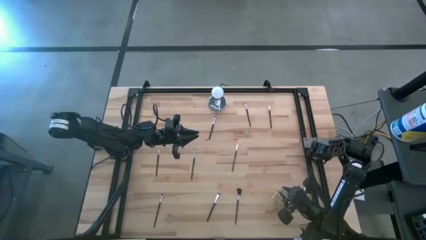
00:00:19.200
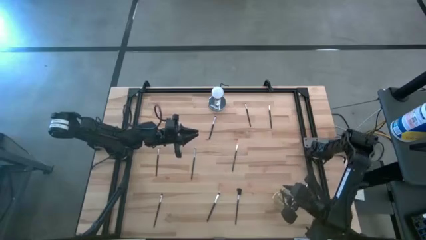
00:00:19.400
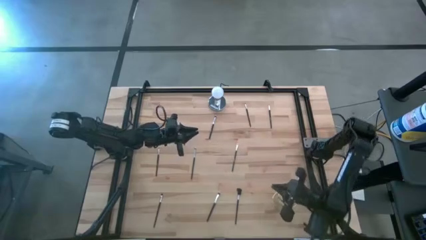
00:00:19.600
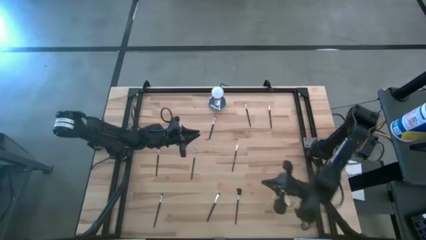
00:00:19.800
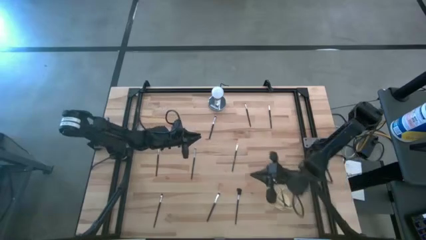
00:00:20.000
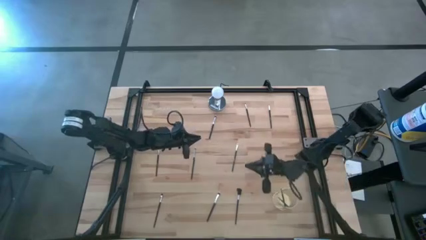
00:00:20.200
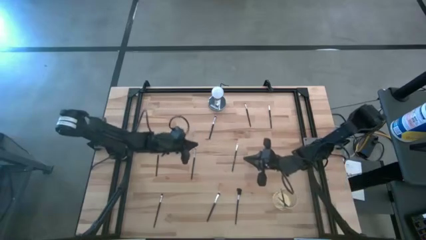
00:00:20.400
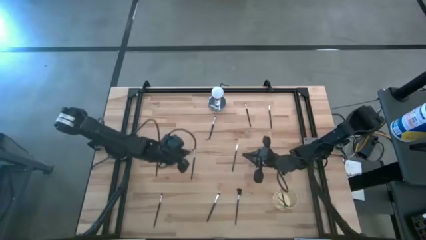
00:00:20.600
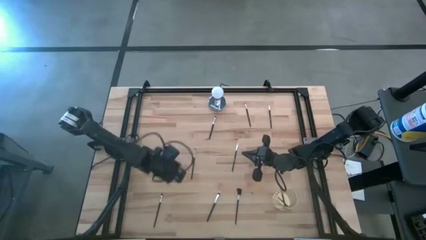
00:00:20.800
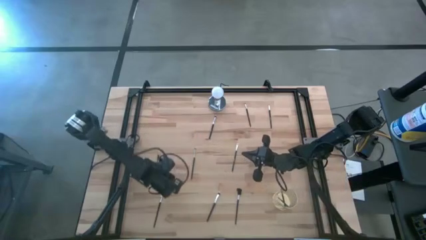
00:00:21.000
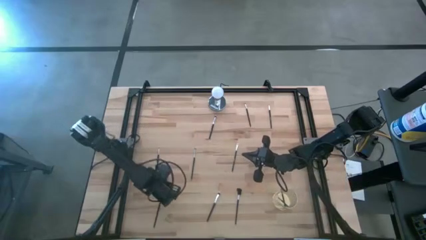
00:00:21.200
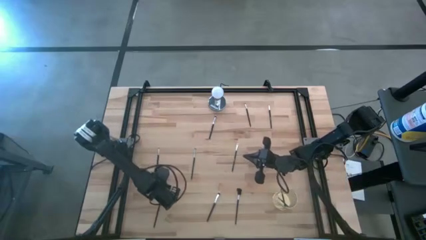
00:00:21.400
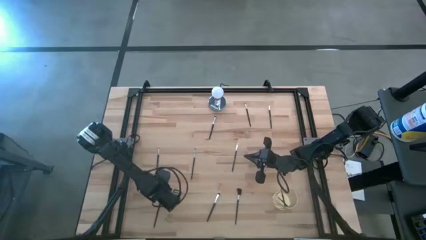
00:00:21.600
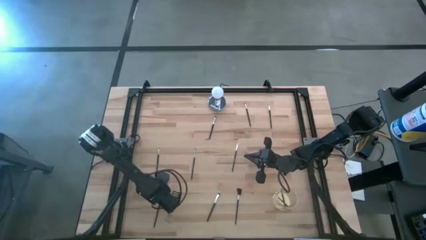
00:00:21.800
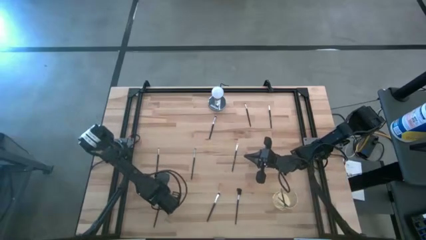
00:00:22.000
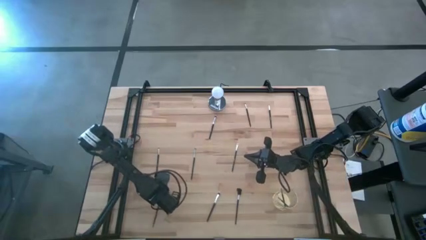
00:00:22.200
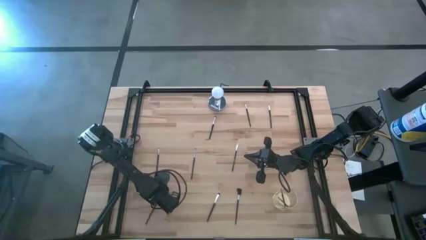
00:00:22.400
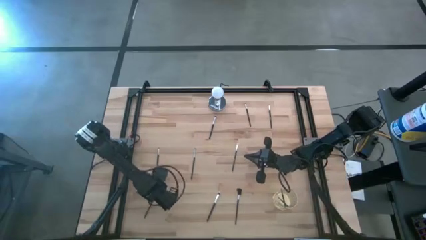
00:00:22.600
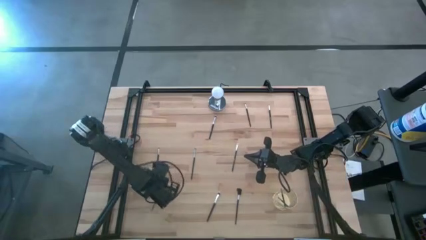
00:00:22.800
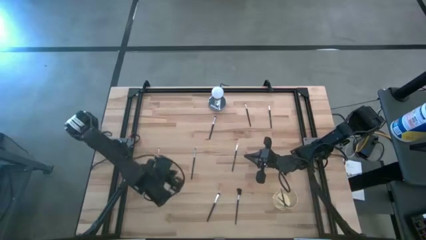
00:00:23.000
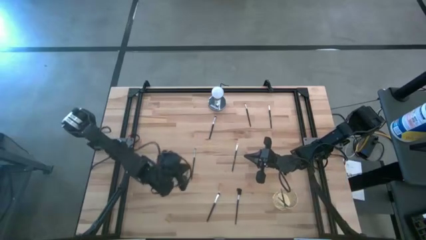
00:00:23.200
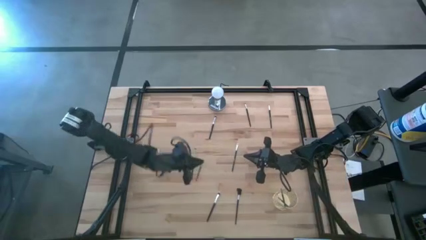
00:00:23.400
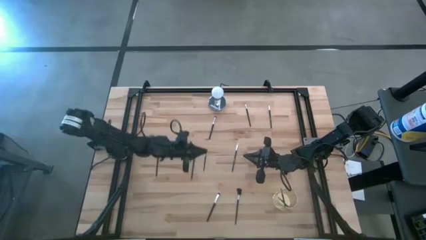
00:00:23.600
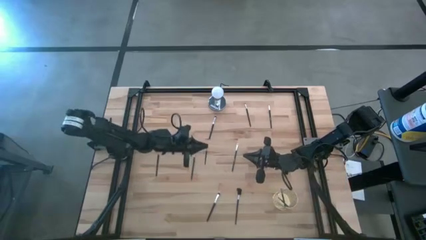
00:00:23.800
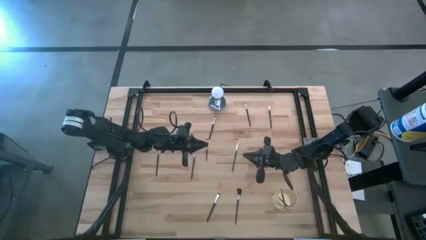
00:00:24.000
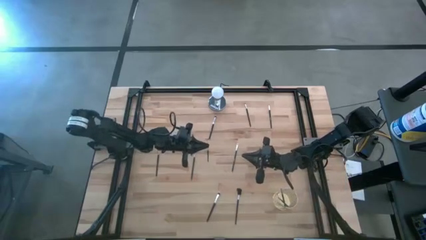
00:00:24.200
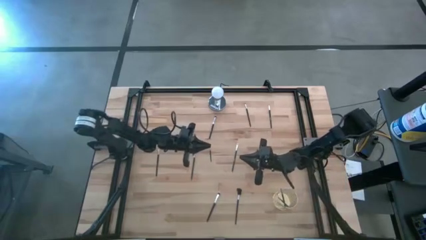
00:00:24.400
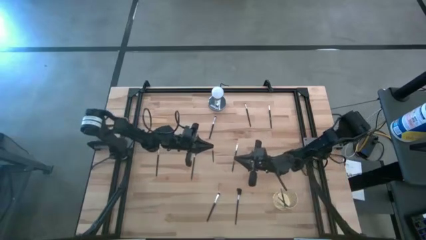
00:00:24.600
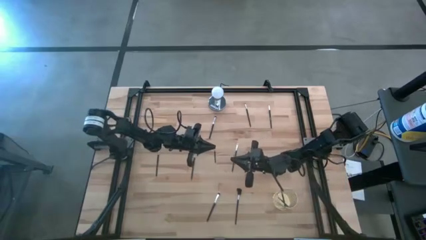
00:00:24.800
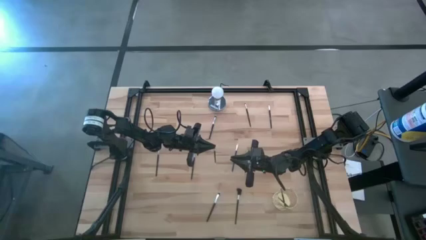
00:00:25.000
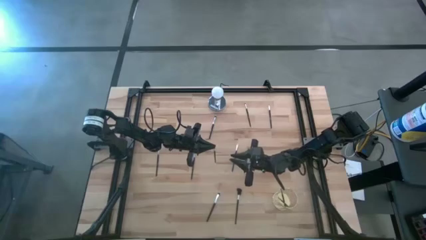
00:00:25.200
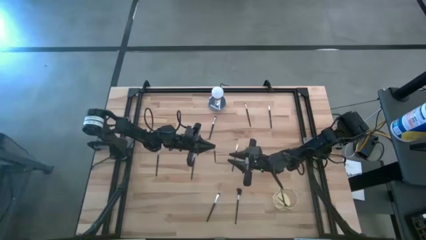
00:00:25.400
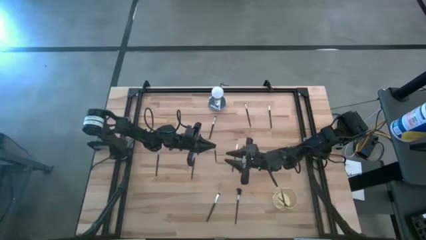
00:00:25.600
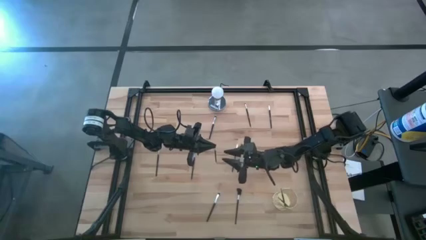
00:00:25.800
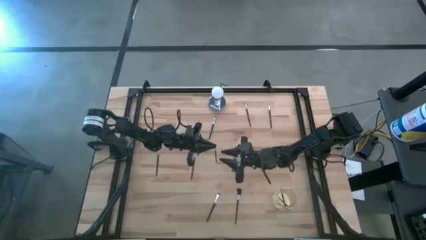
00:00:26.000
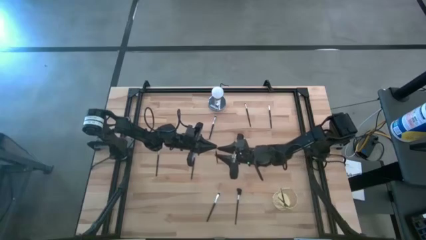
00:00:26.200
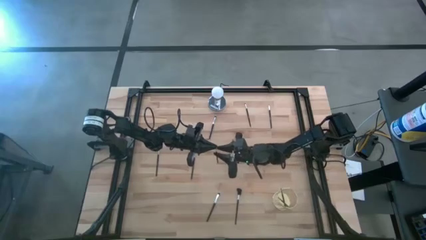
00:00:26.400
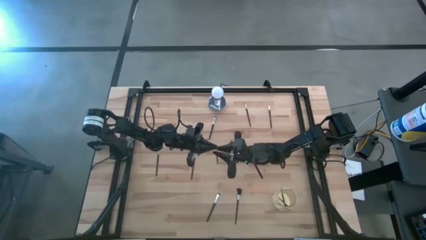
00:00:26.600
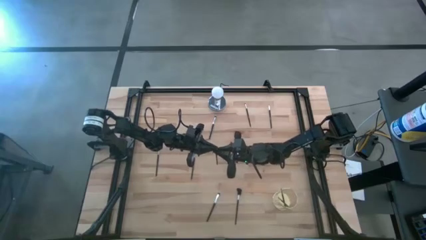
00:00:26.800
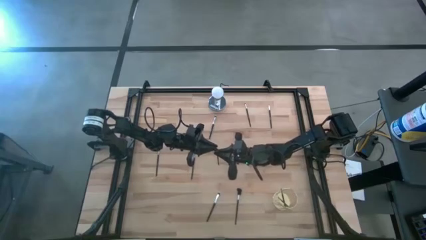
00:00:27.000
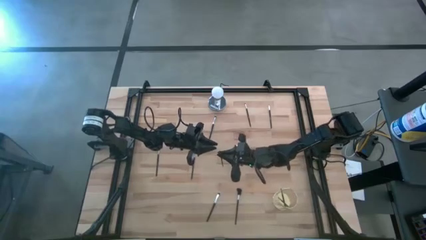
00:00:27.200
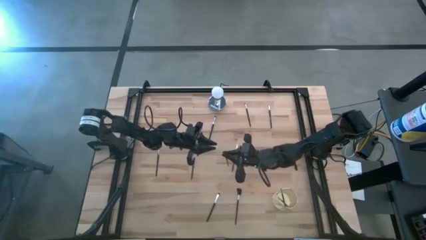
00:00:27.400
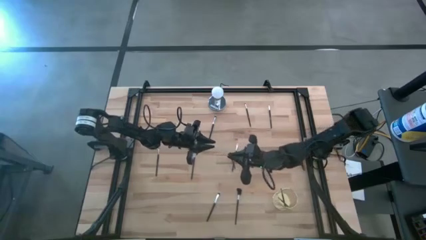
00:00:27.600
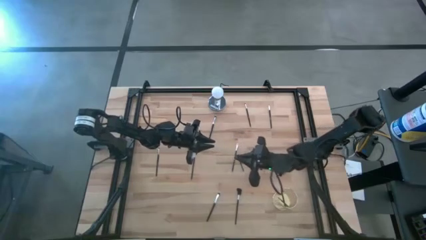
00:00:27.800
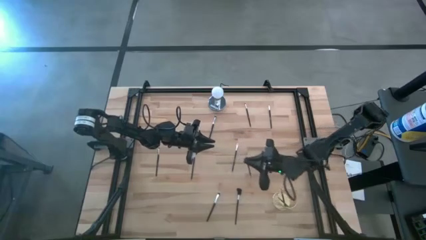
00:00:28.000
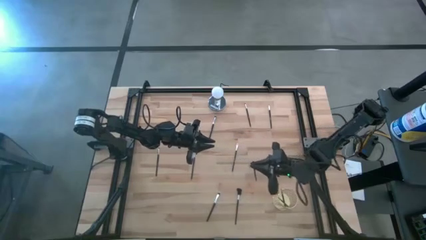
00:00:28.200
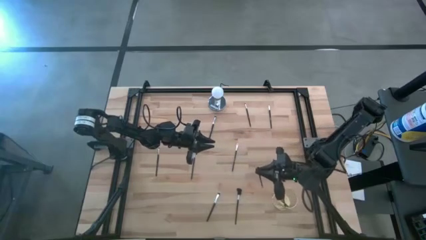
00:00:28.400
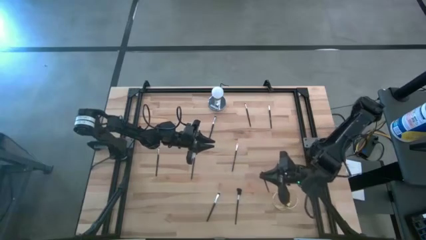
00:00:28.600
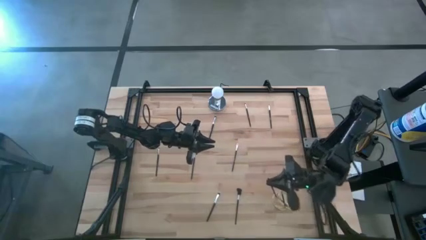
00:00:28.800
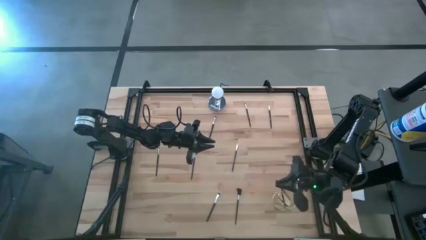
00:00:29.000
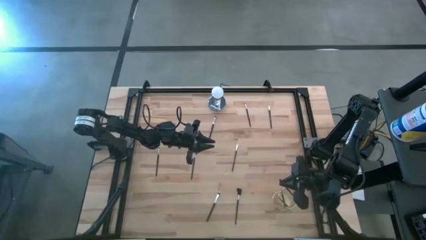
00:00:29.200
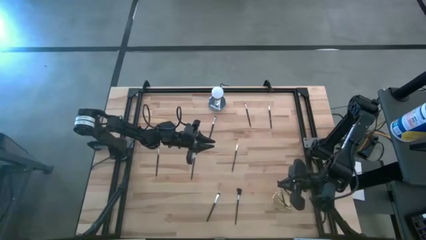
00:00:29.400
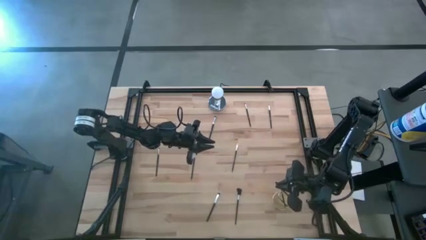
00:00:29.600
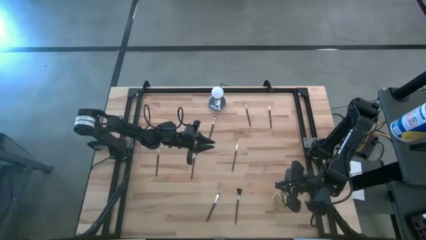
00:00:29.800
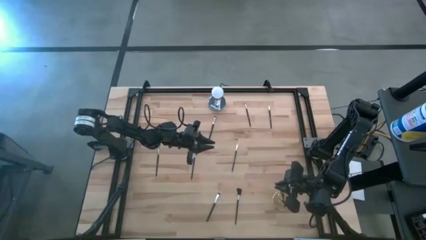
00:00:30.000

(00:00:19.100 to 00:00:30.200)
Task: Pick & Place Makeup Supplies
Put the silver makeup brush into the gold makeup holder

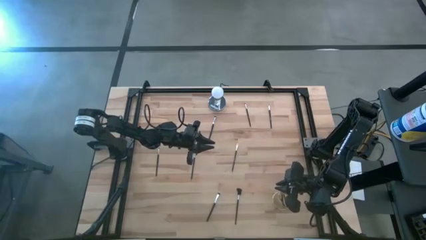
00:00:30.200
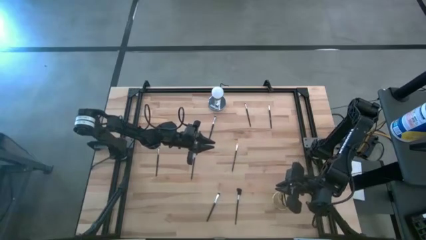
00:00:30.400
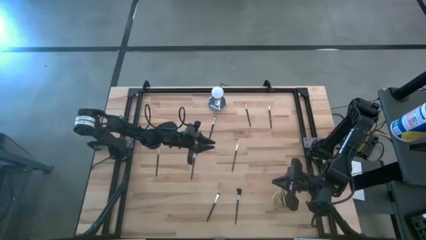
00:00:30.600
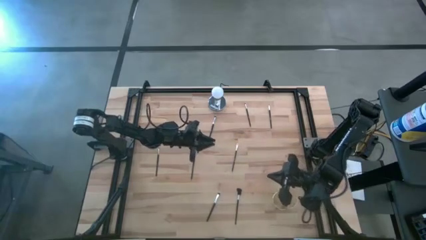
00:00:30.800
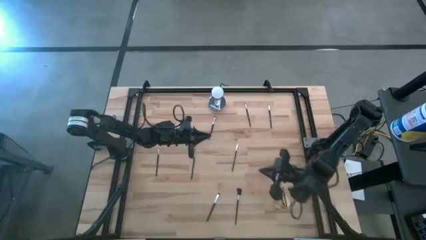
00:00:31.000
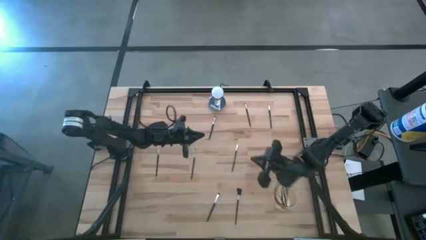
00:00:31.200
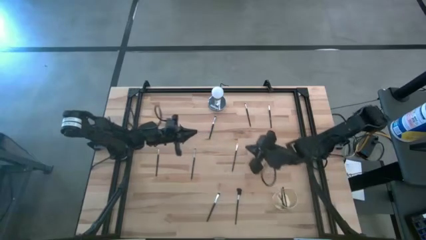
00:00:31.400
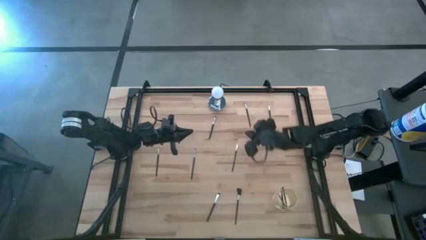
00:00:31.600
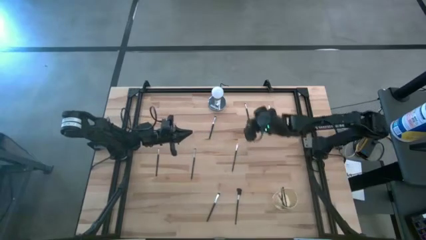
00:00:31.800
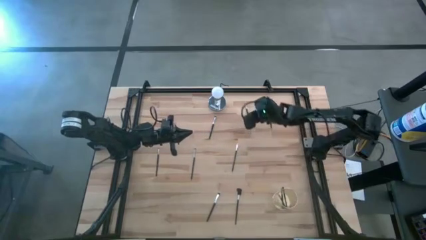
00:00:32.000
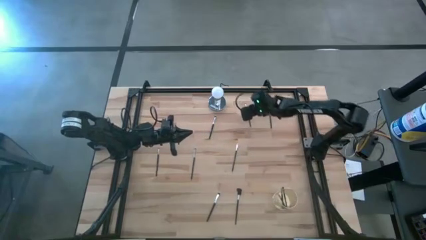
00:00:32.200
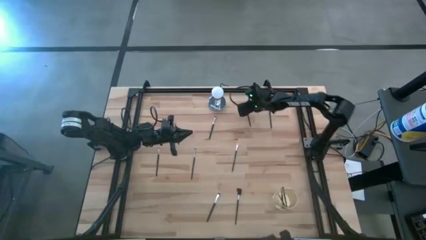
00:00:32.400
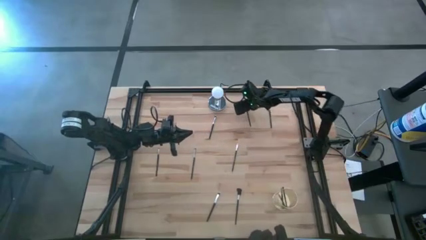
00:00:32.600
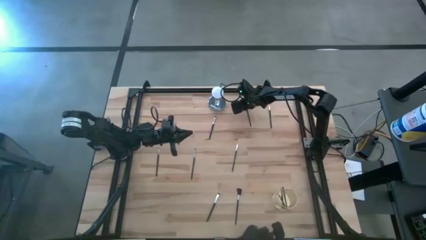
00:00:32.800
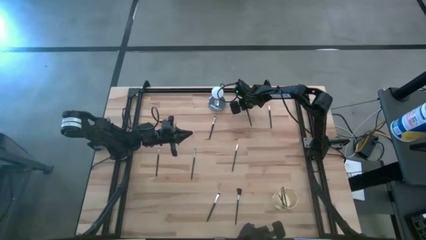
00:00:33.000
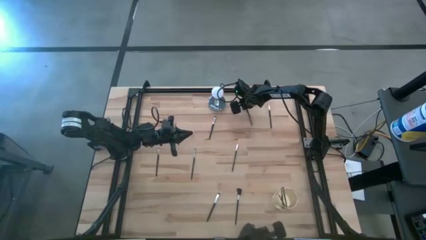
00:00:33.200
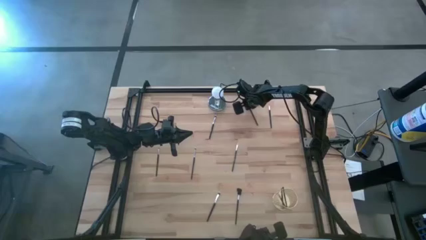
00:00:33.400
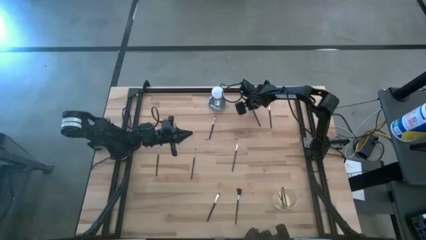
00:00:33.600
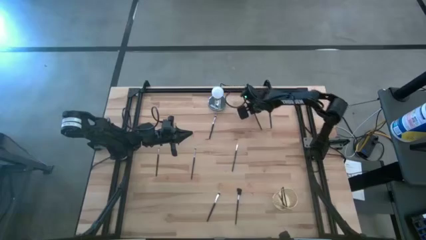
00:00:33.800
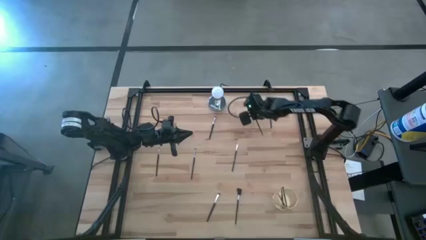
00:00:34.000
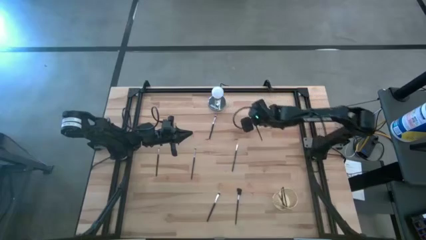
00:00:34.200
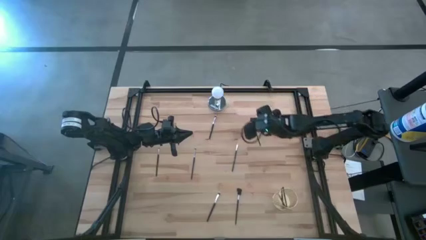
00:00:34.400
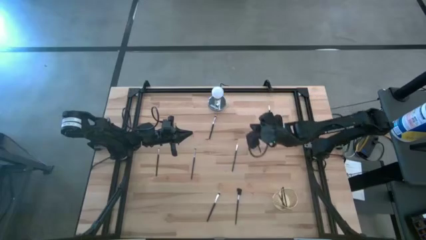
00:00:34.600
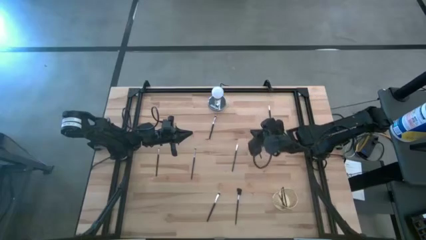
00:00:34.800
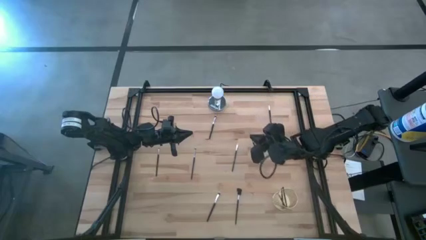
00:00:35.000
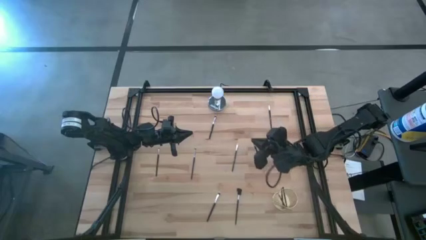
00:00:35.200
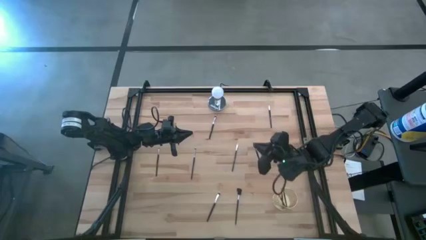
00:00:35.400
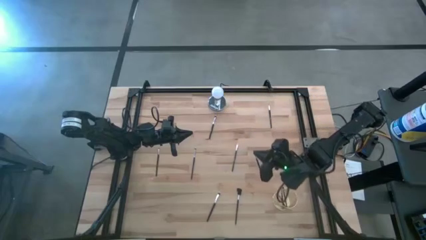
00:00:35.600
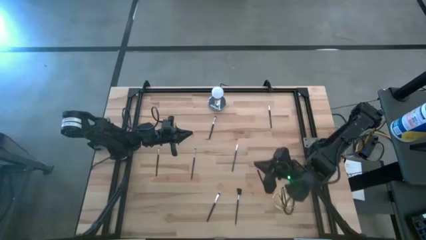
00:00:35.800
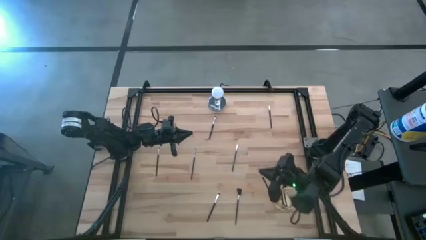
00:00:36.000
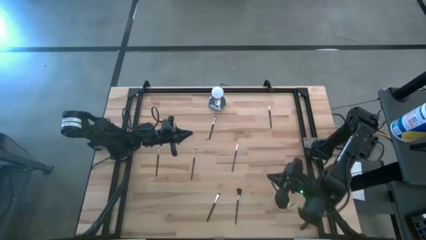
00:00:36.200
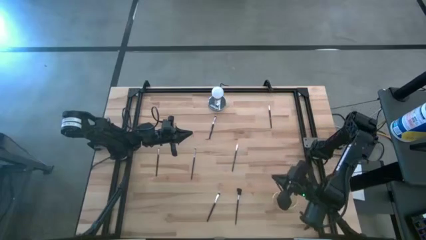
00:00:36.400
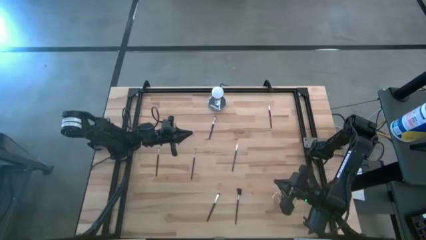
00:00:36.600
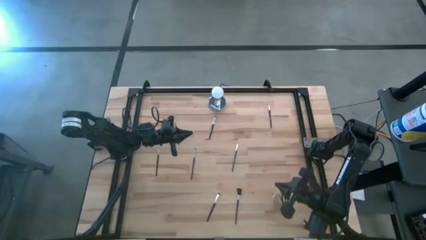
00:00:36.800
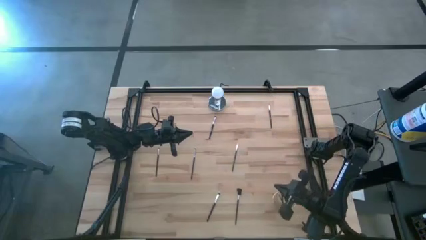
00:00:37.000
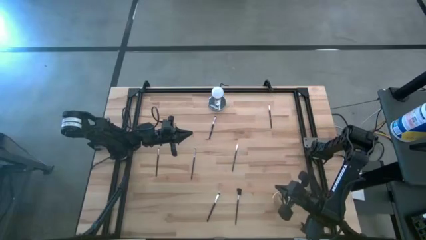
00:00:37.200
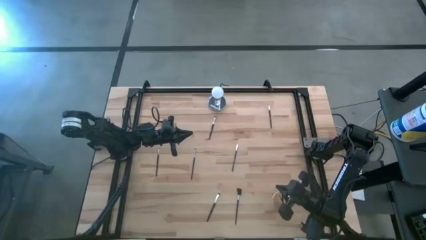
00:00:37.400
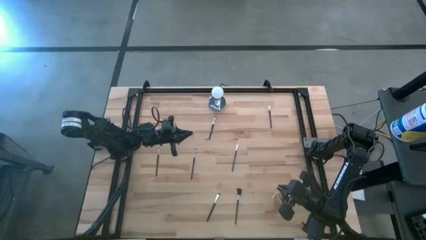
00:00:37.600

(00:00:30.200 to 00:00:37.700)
Put the silver makeup brush into the gold makeup holder
